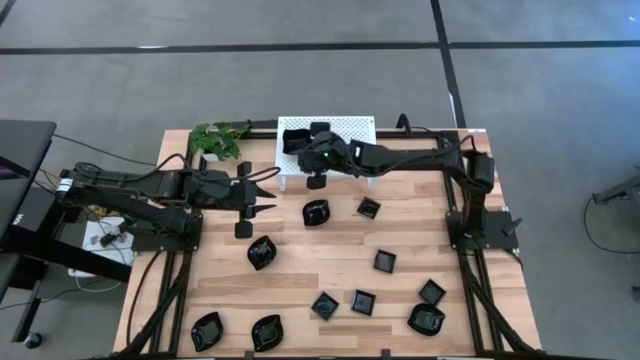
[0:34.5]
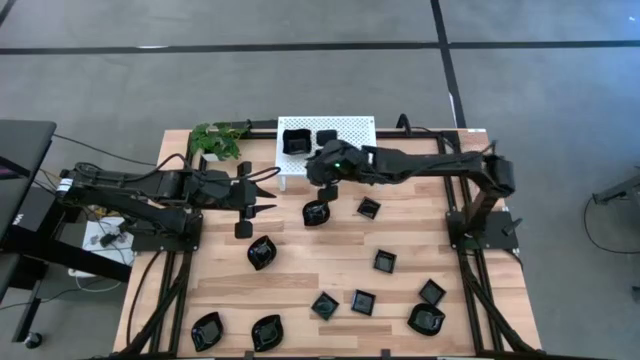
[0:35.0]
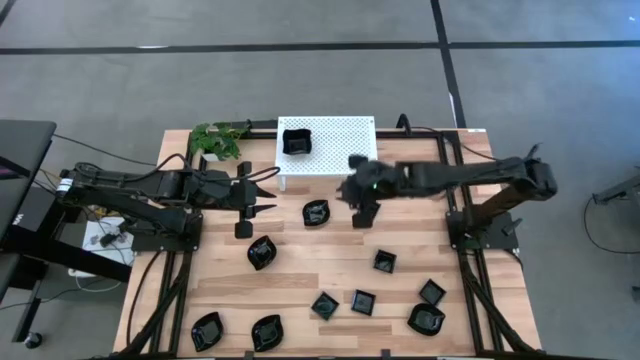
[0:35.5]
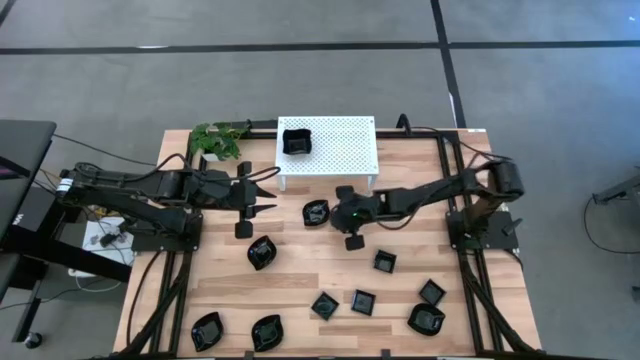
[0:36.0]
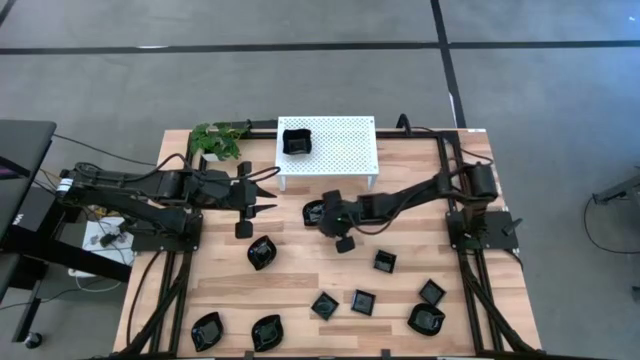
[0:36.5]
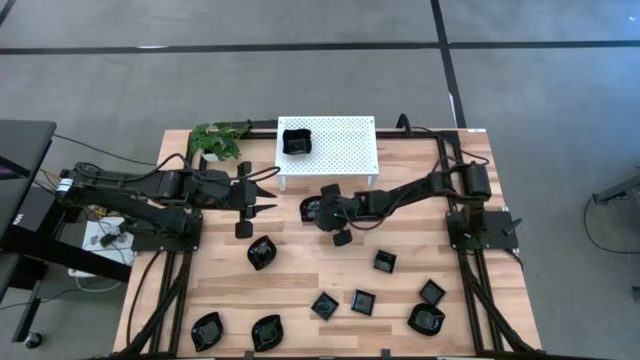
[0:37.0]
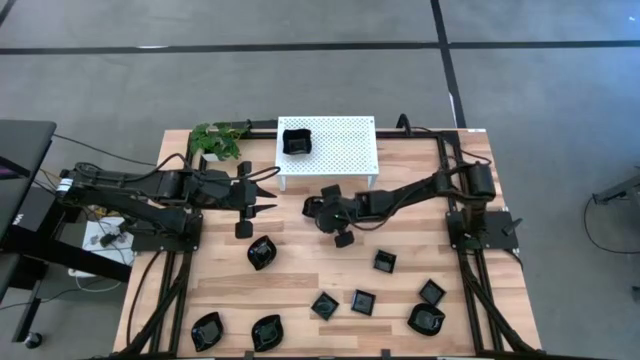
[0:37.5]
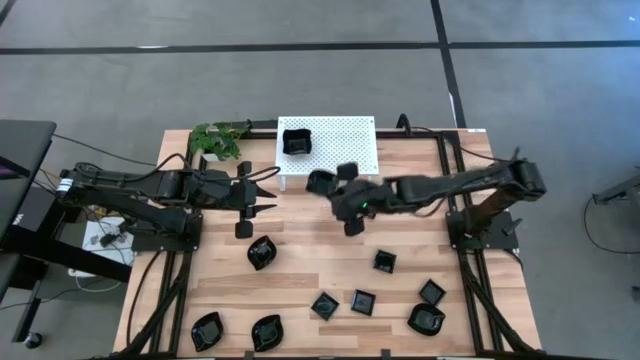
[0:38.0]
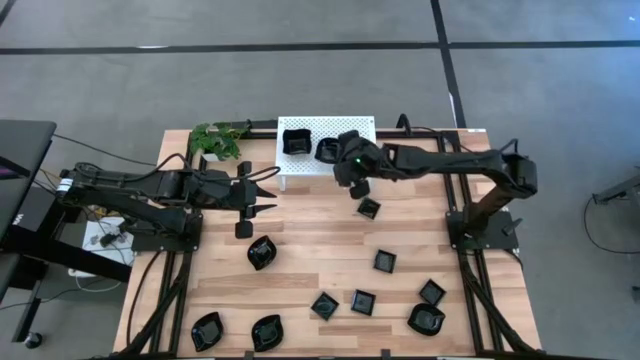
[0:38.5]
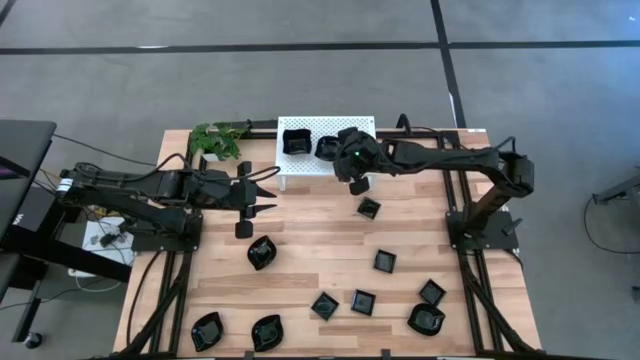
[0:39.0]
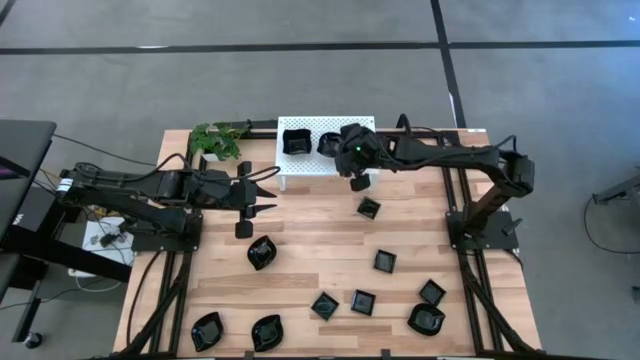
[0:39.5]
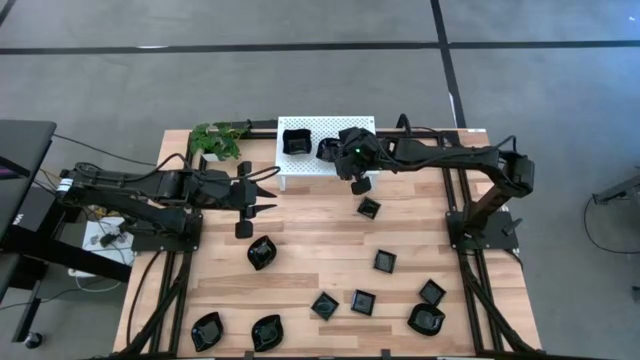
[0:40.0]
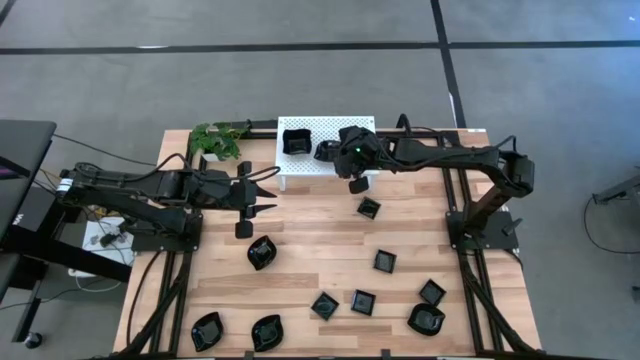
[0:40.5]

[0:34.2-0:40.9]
Task: Pick & Place Mini shaped plates
Put the black leaf-shaped plate on the shelf

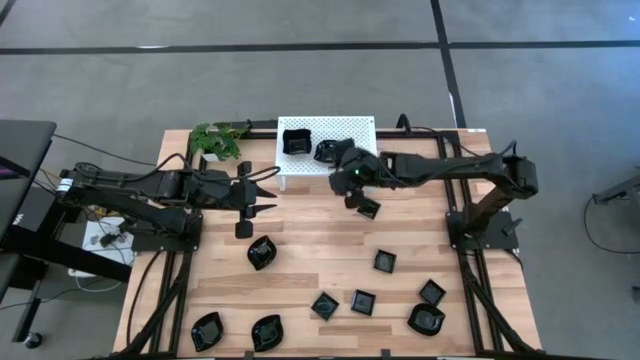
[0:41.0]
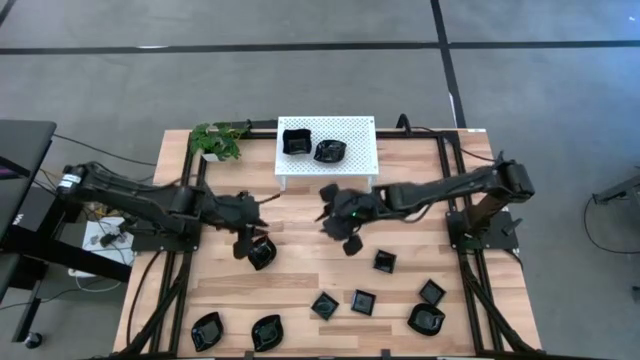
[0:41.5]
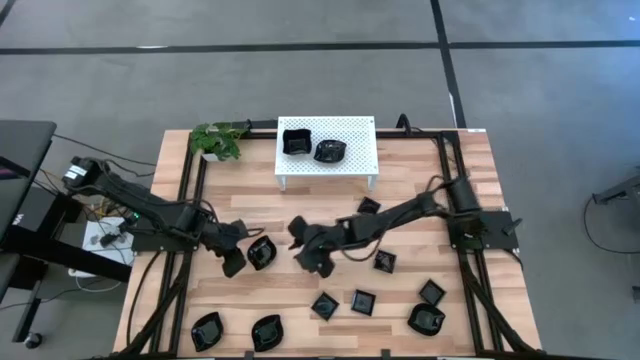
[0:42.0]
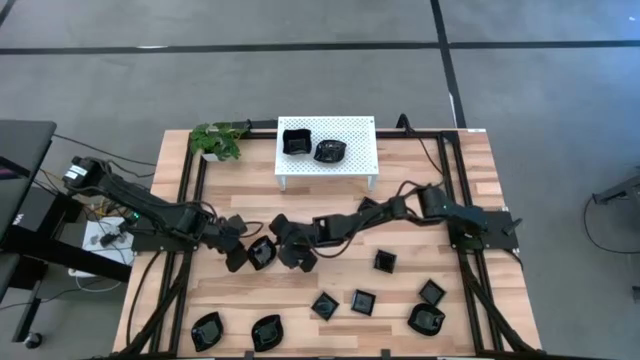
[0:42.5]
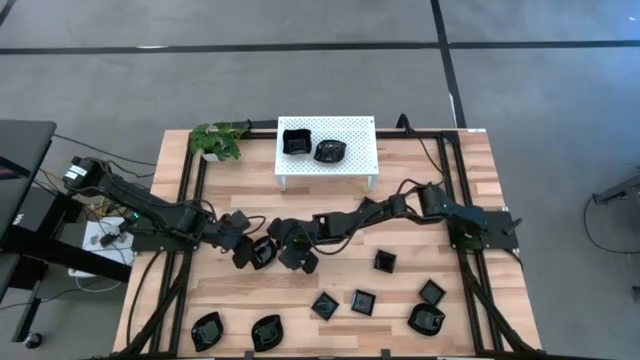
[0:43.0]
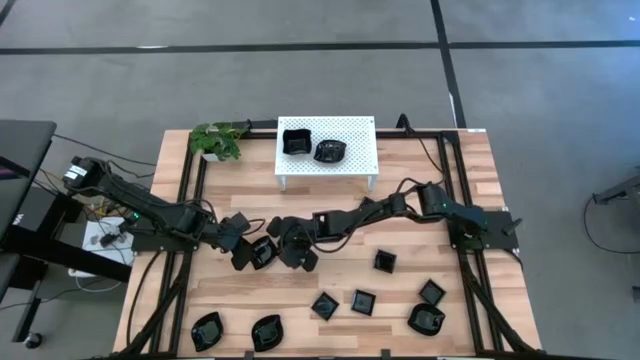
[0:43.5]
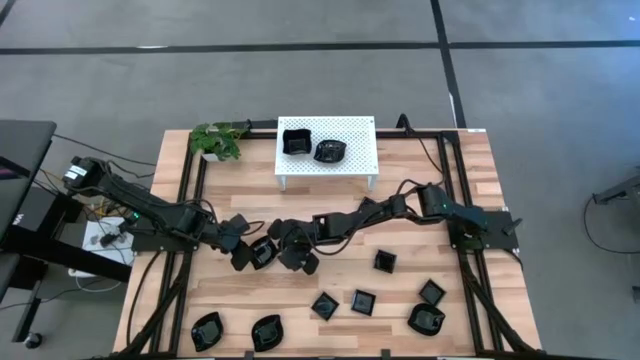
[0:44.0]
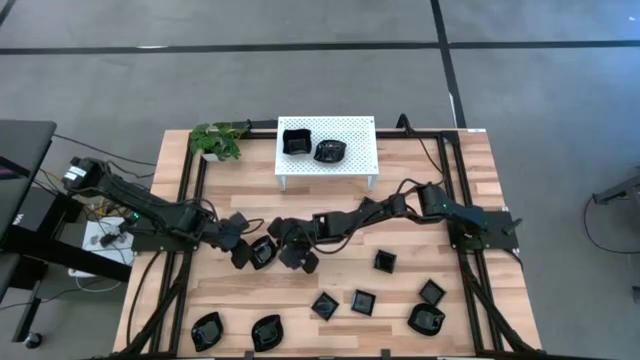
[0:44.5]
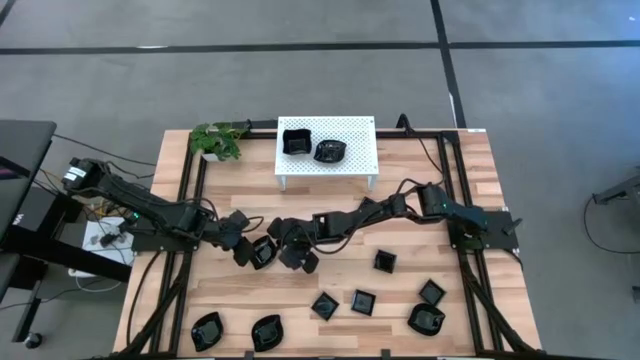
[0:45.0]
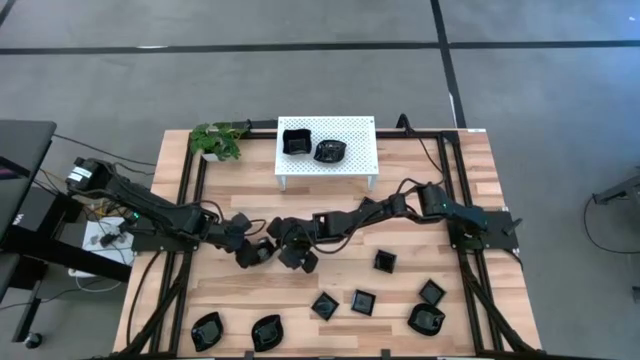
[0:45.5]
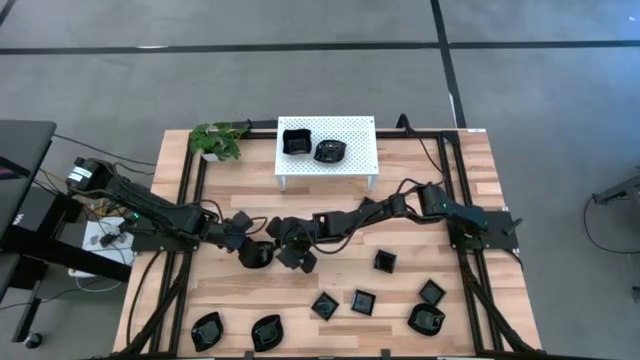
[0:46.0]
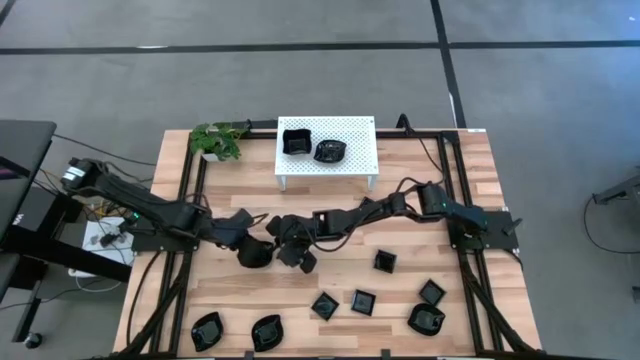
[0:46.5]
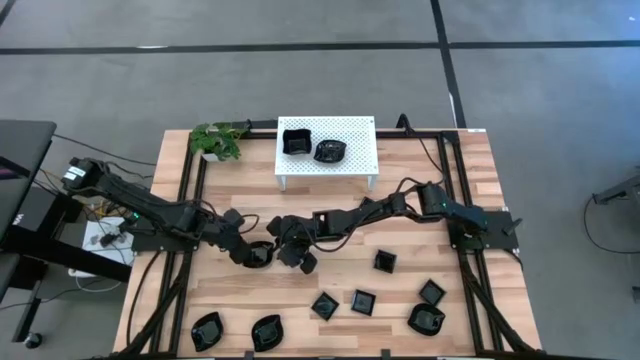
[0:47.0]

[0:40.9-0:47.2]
Stack the black leaf-shaped plate on top of the black leaf-shaped plate on the shelf

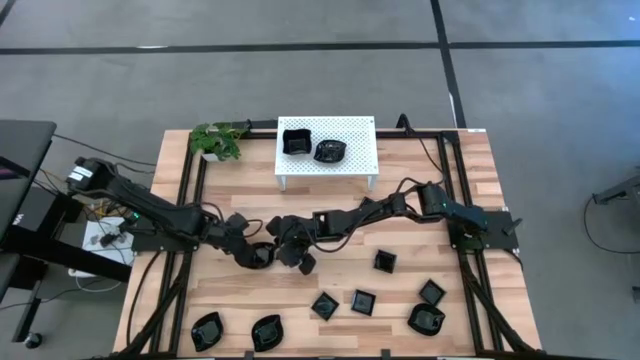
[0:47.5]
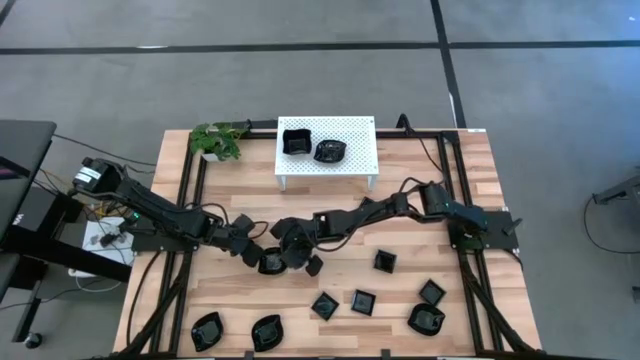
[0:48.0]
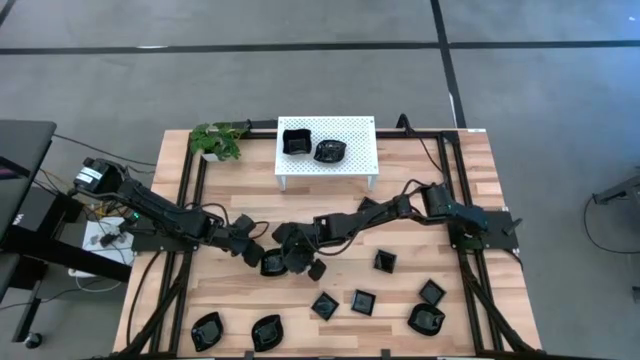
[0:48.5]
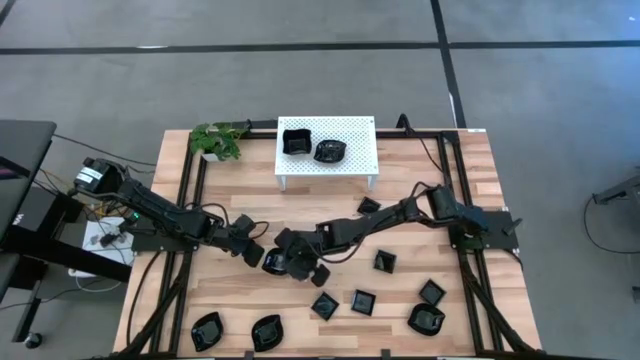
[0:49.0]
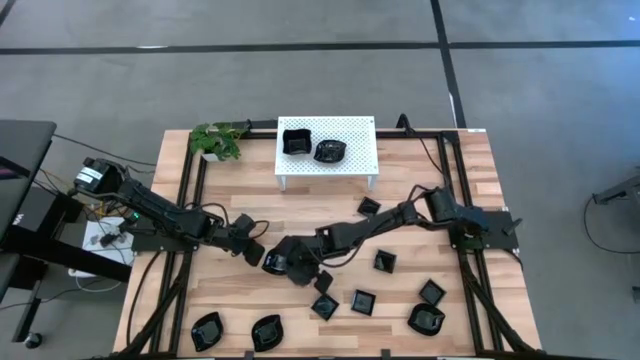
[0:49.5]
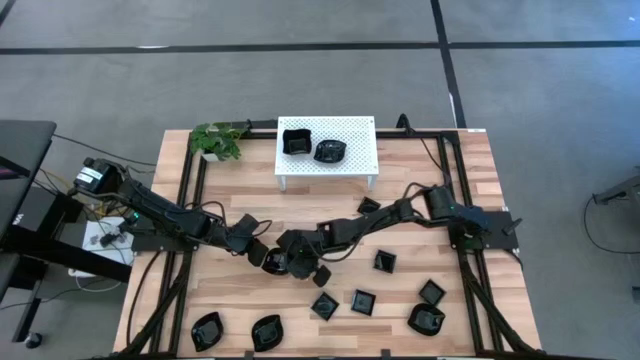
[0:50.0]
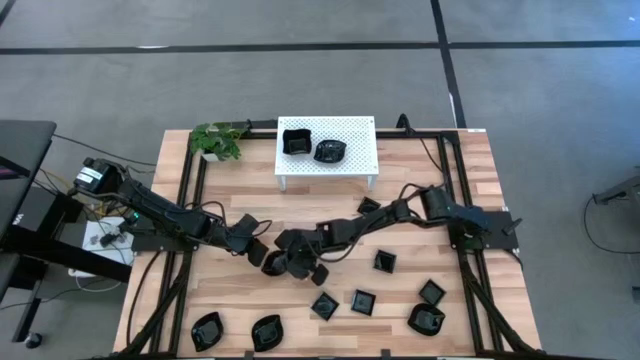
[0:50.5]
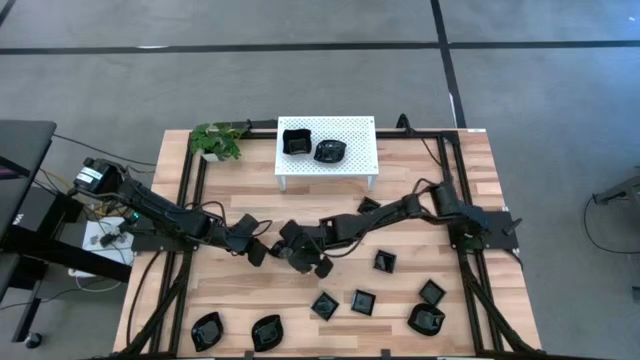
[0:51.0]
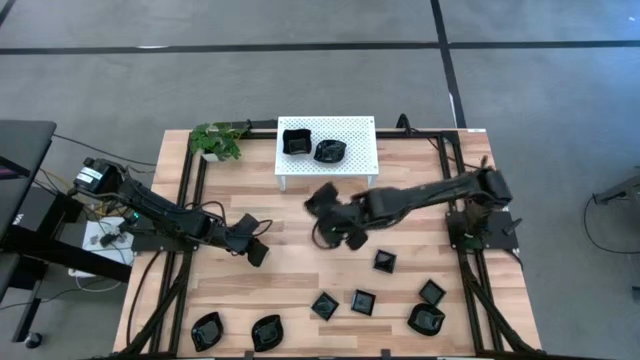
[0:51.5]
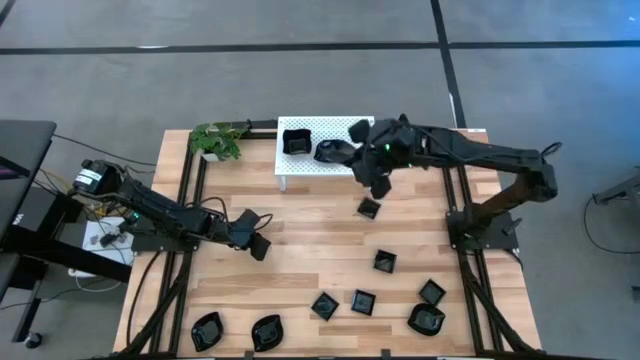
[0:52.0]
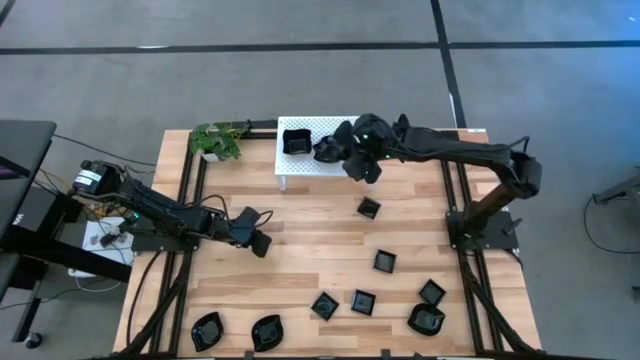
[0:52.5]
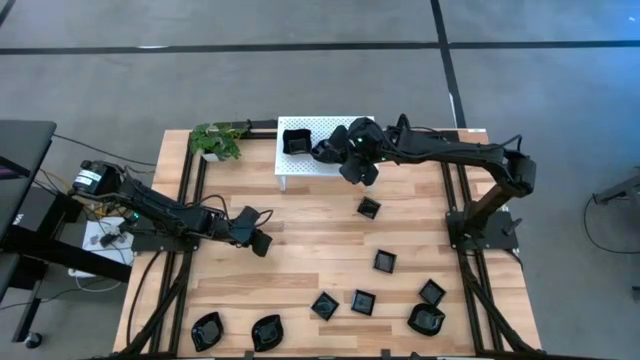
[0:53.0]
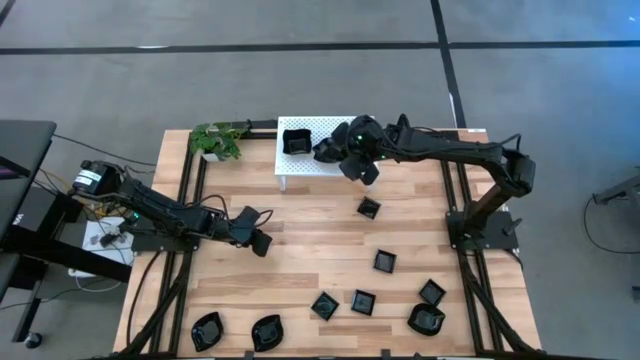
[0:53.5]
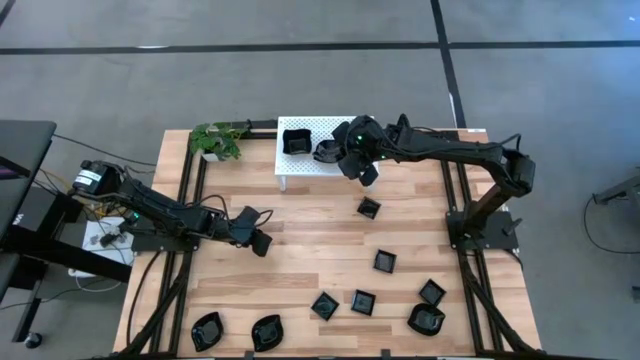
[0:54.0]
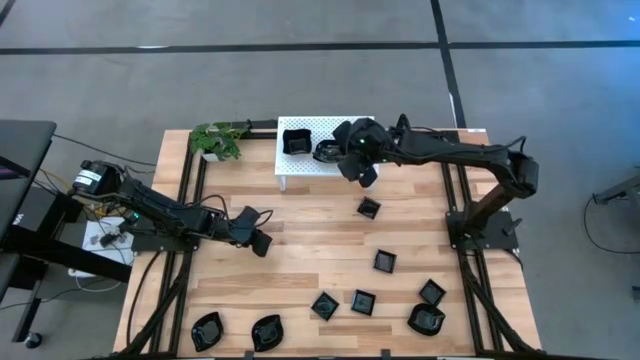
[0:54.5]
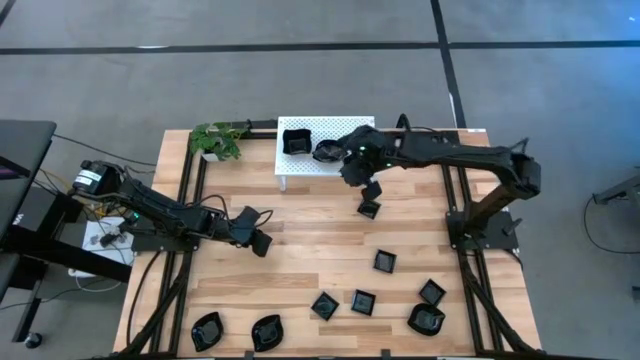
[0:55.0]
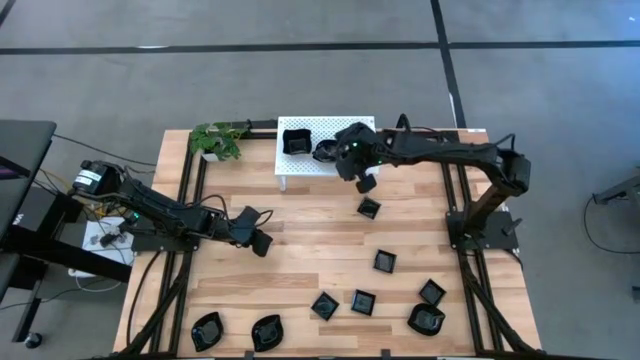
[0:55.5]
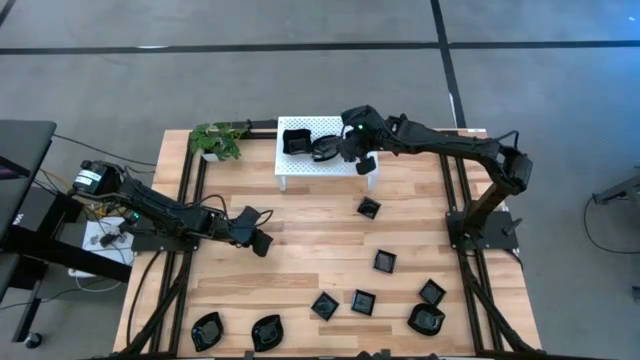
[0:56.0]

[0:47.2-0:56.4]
Stack the black leaf-shaped plate on top of the black leaf-shaped plate on the shelf
